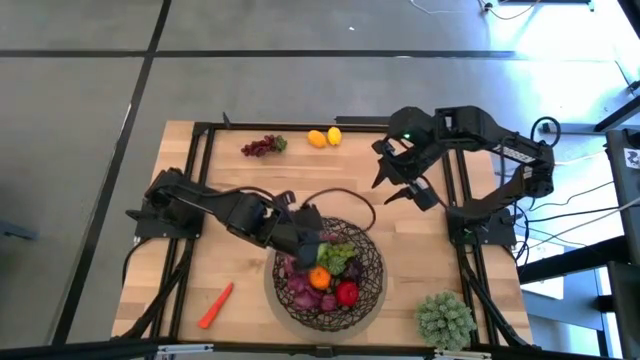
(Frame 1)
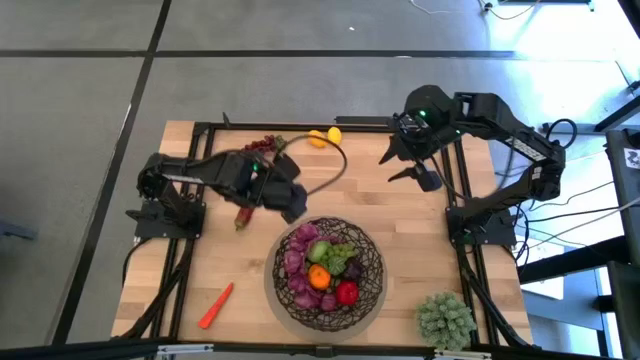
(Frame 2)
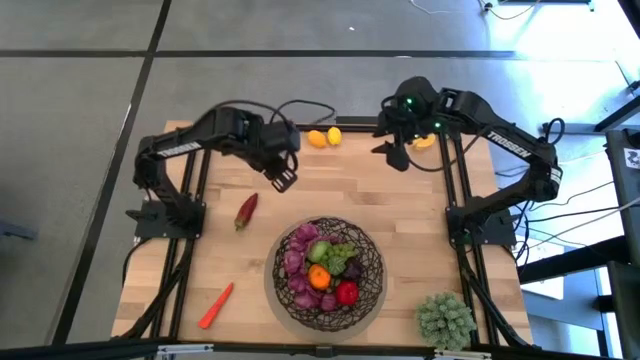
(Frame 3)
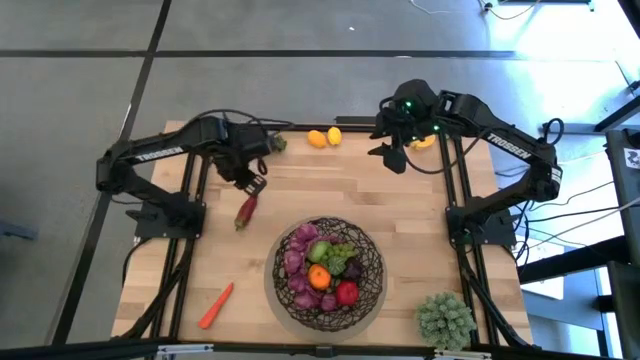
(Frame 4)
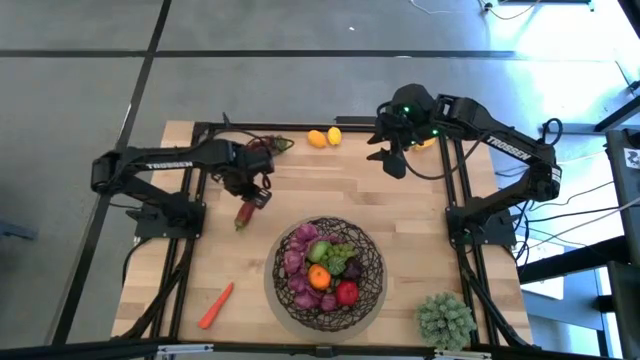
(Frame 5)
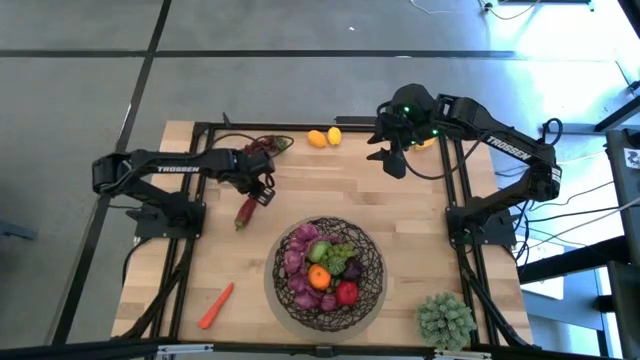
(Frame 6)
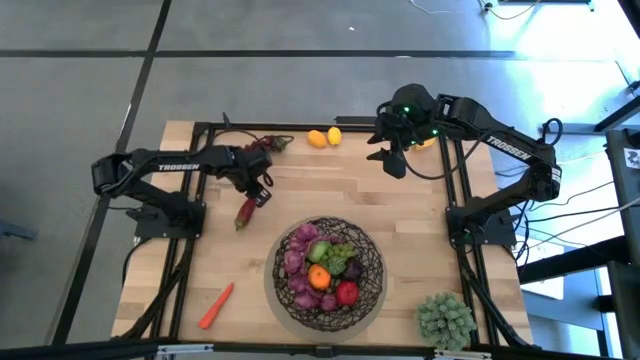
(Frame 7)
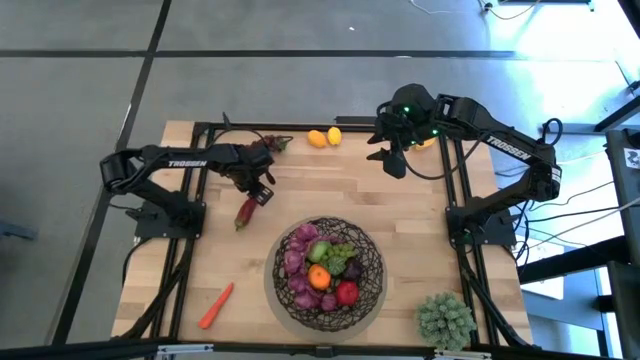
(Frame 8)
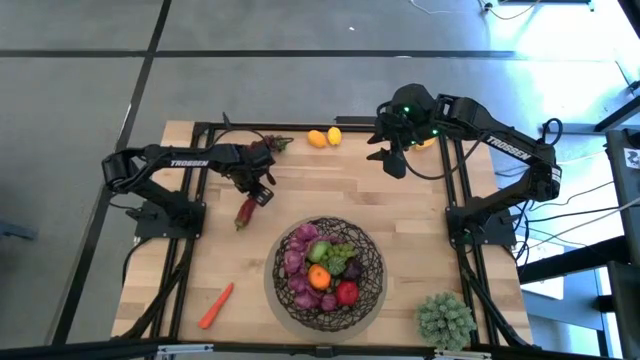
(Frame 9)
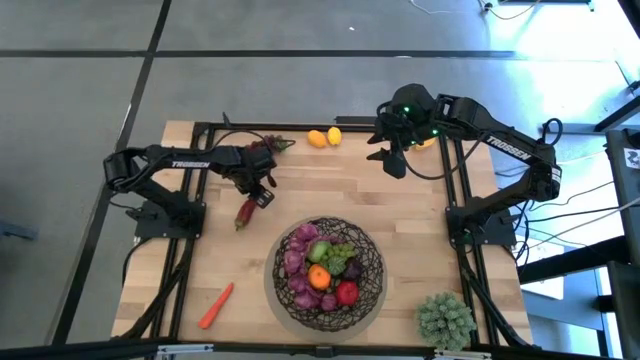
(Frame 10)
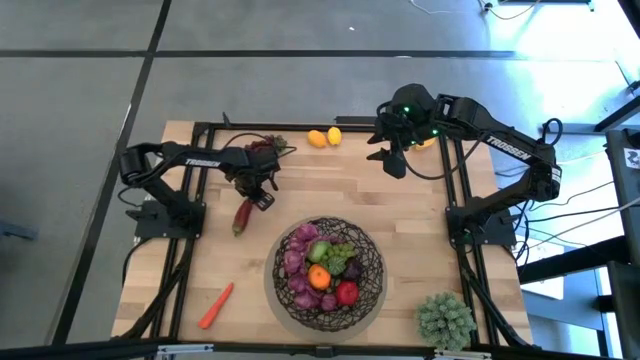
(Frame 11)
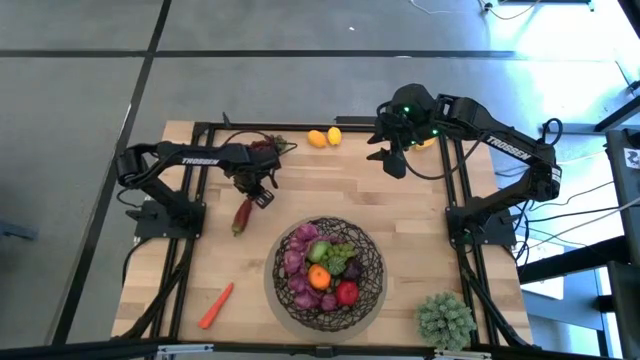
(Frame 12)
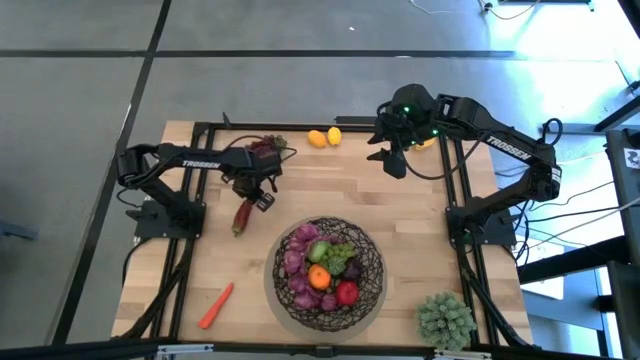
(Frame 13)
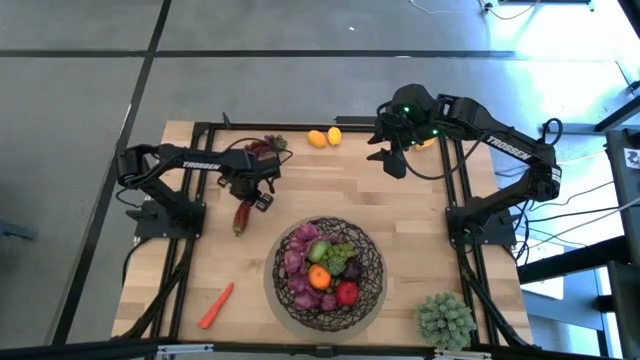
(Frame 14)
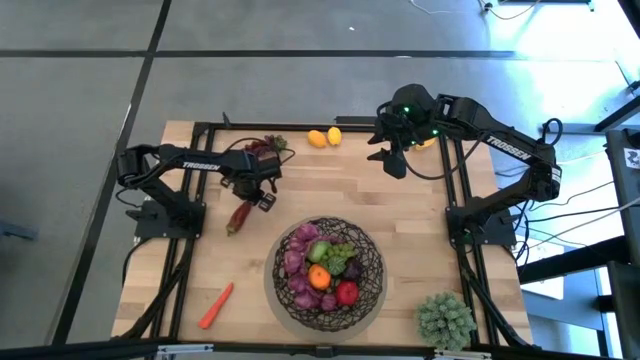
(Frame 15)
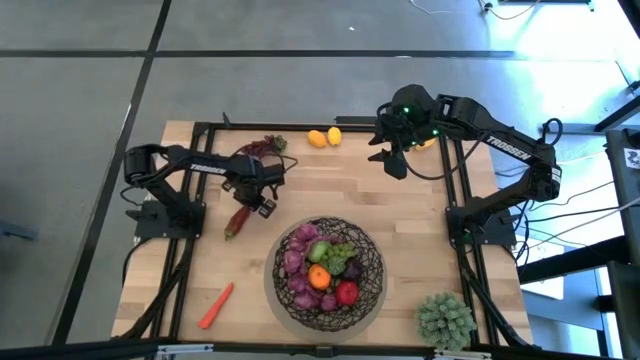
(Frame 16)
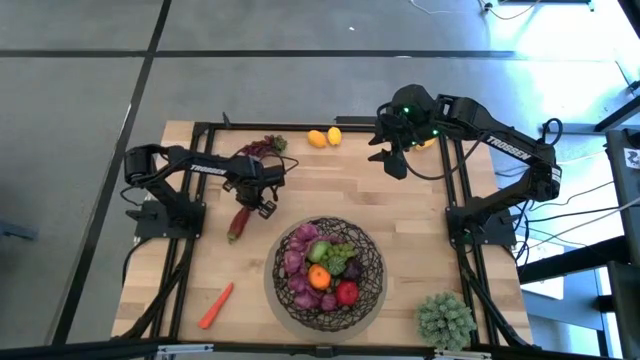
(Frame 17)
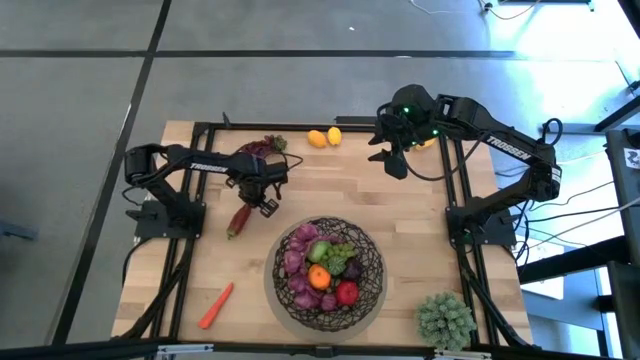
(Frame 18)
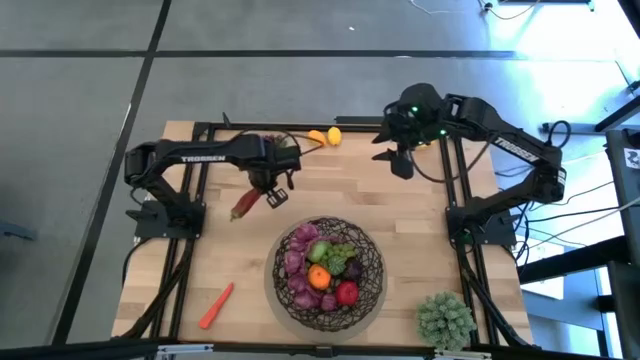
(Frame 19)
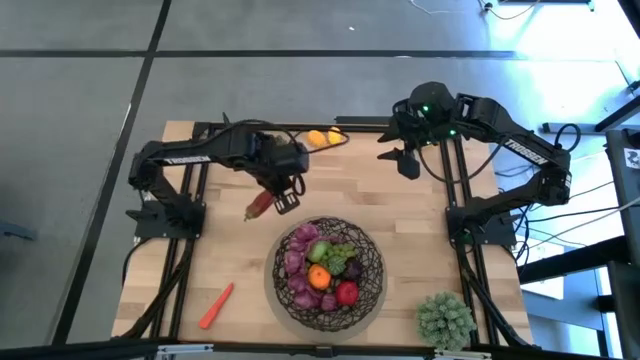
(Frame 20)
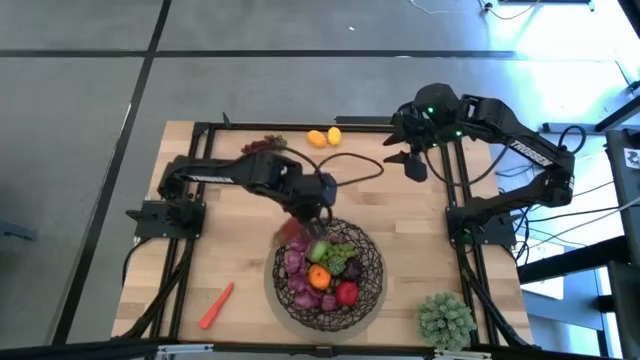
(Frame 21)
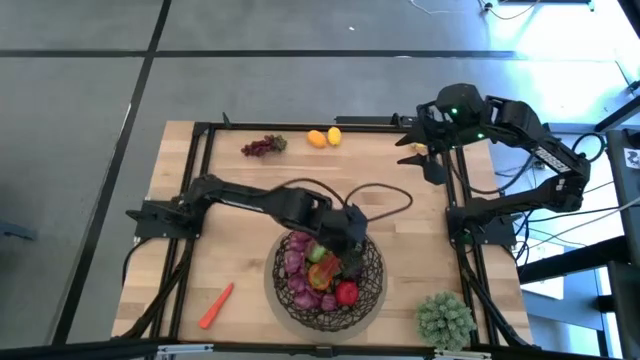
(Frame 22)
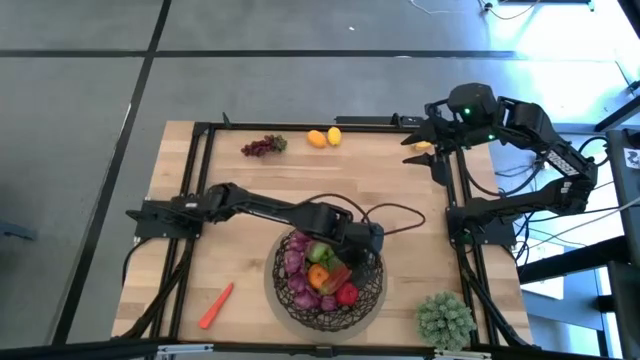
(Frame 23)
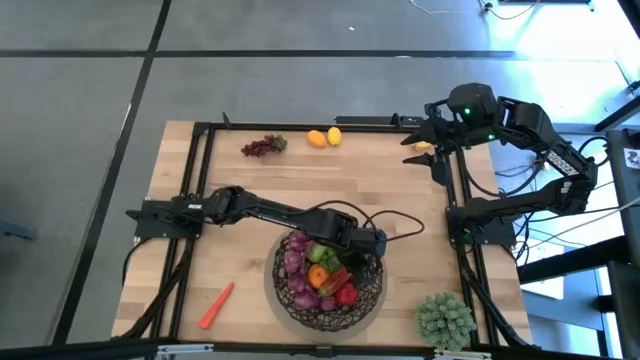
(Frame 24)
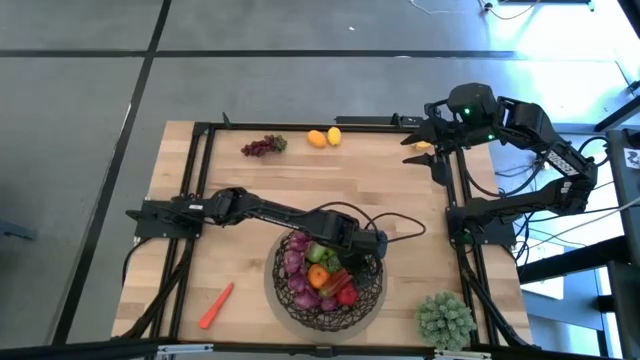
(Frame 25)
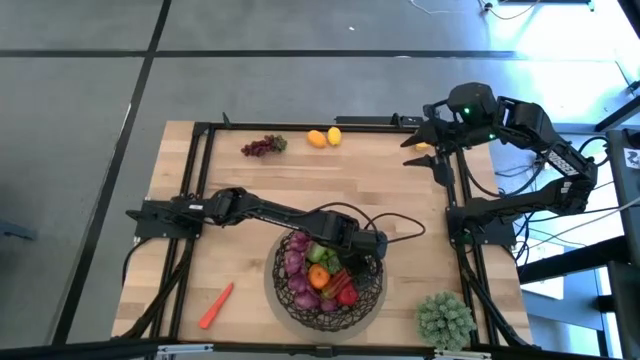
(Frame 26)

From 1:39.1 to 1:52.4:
Task: Build produce basket
Put the chili pepper into the mesh basket

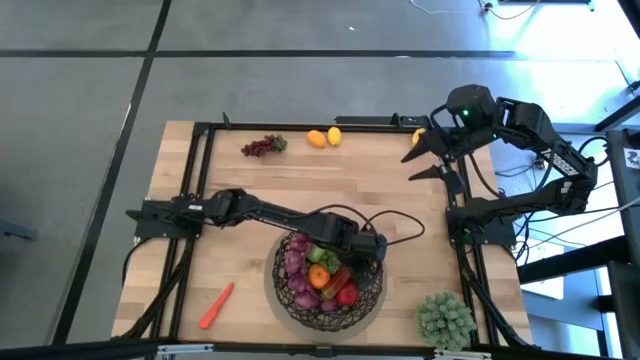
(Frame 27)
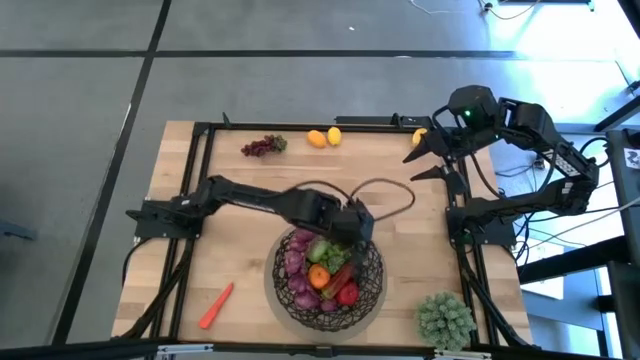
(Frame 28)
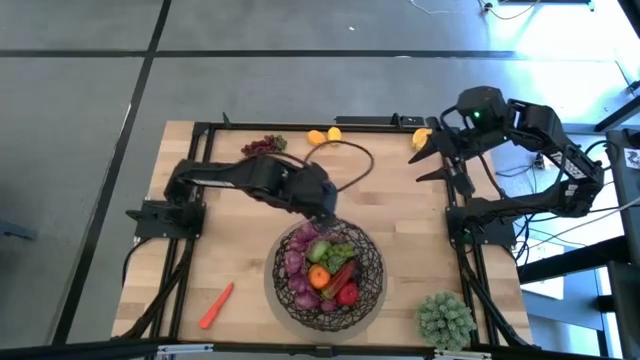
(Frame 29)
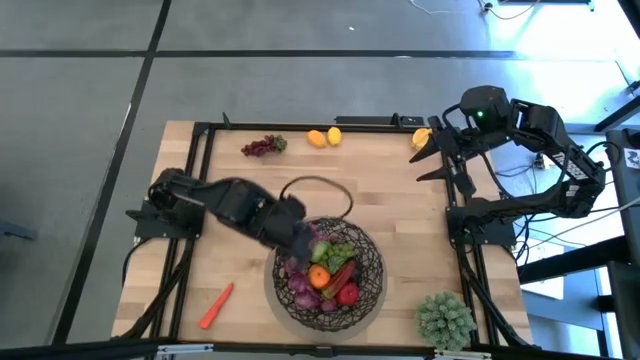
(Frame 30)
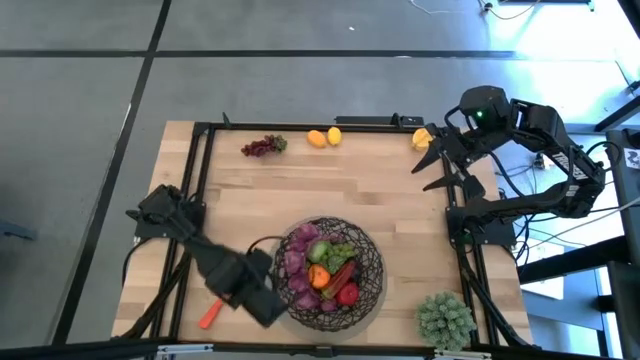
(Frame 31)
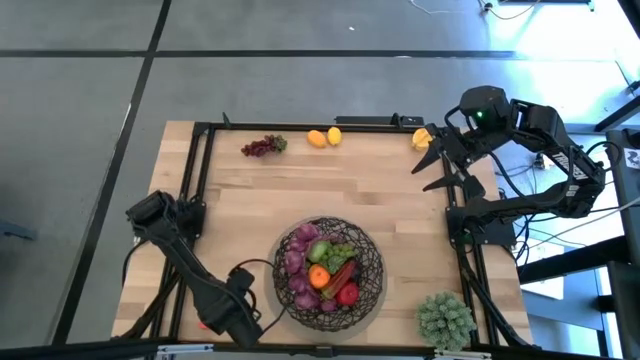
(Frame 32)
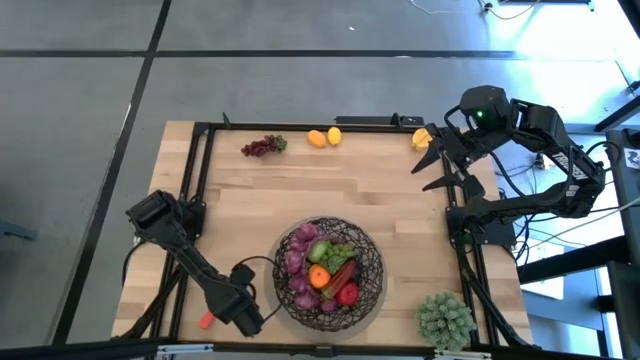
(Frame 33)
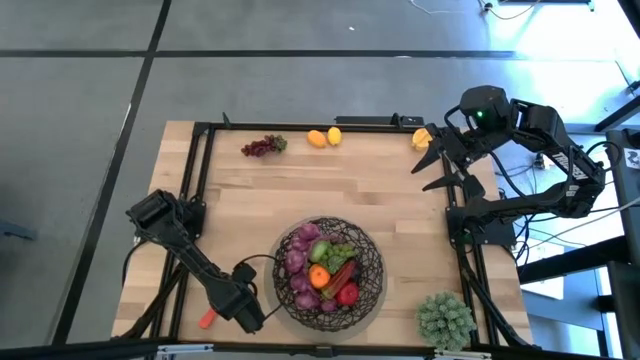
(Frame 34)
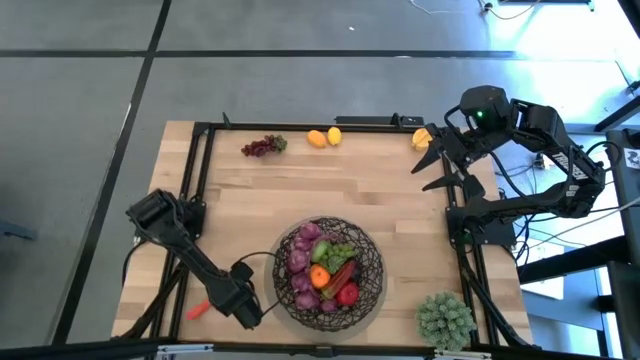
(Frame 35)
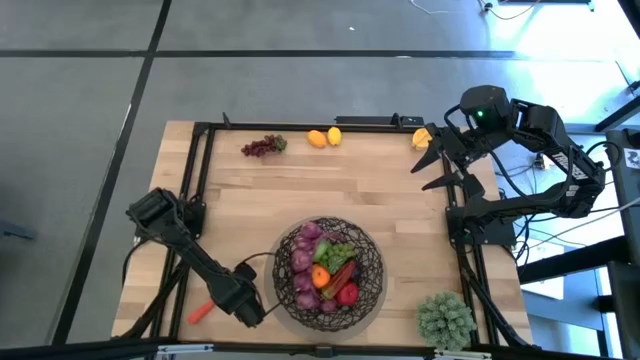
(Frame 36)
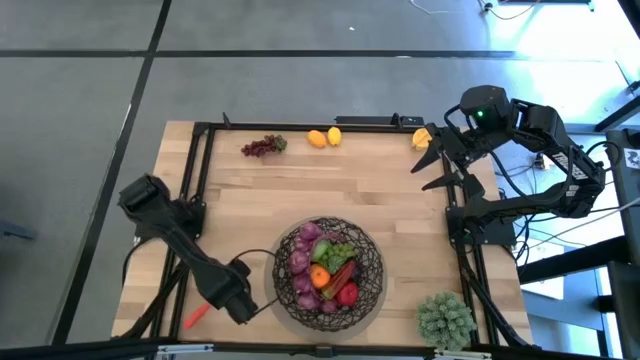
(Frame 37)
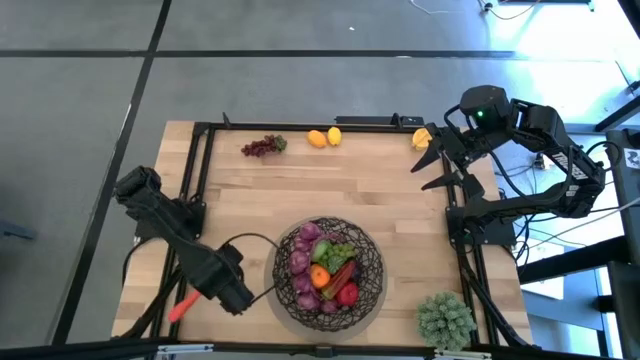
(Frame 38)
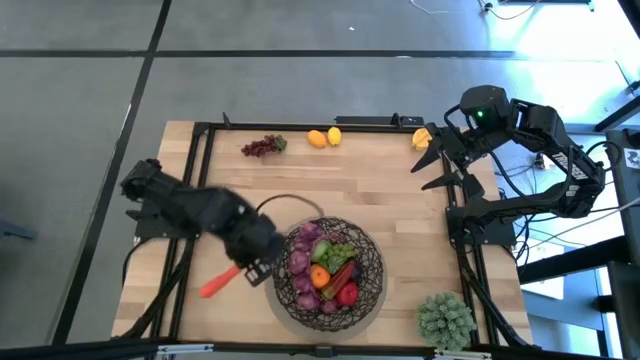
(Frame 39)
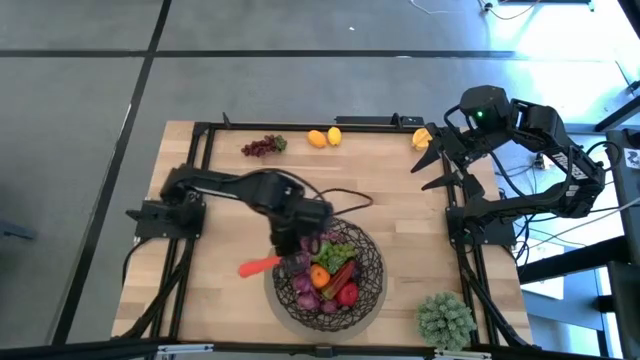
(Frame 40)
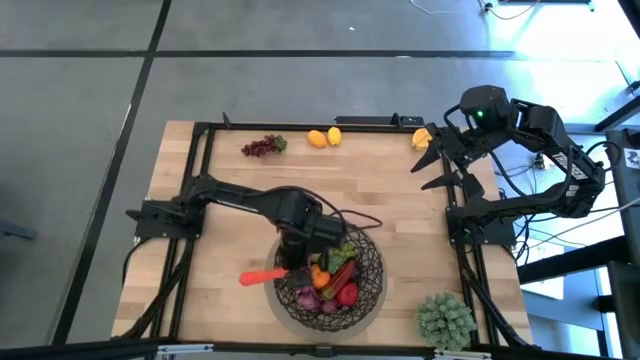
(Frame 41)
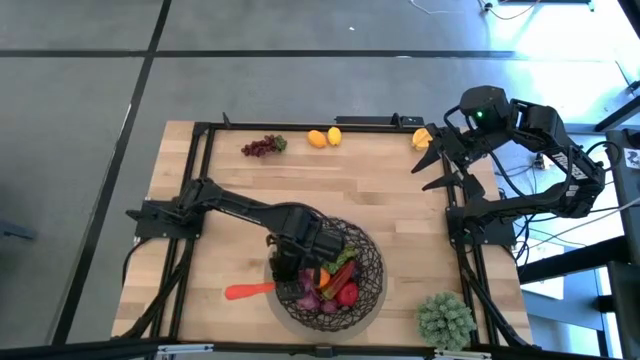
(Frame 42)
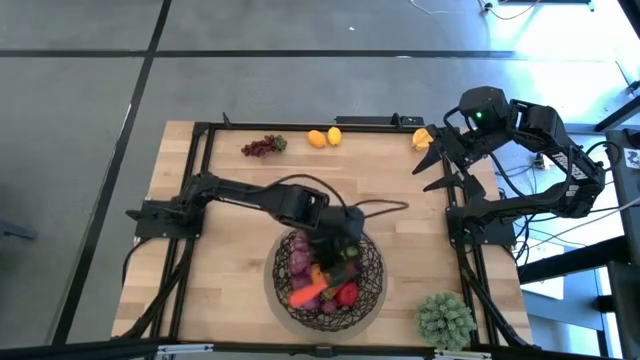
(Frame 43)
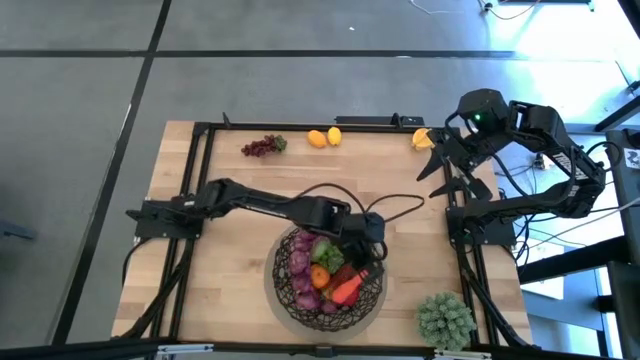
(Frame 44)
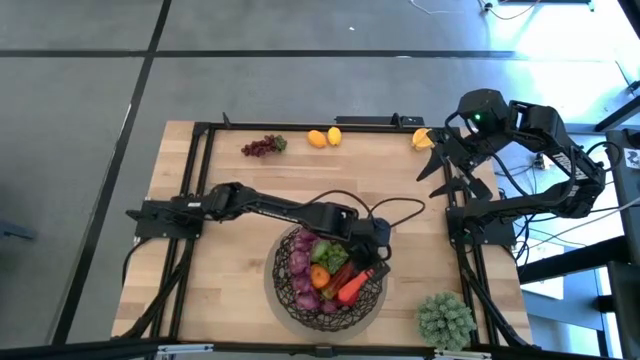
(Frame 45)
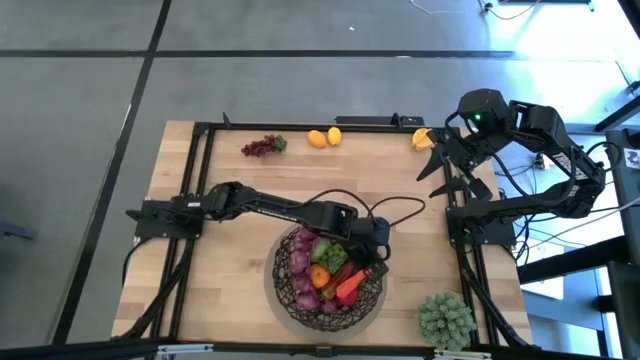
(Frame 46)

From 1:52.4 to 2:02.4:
Put the carrot into the mesh basket
